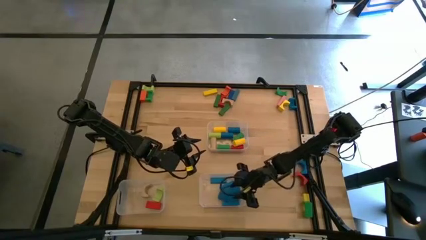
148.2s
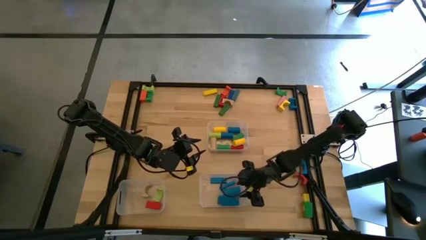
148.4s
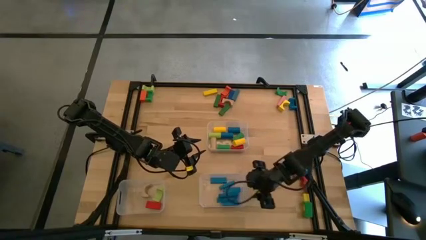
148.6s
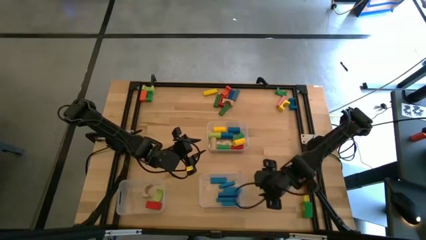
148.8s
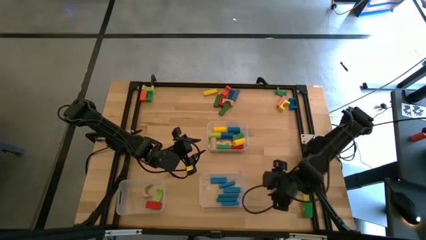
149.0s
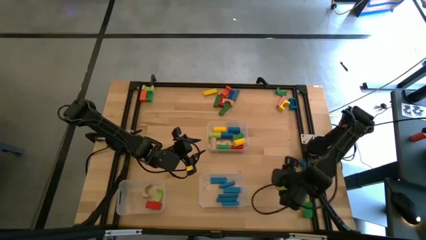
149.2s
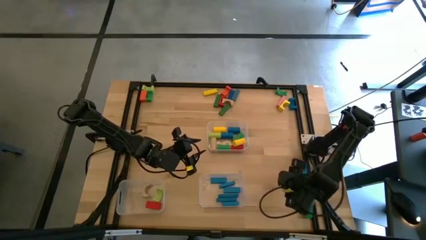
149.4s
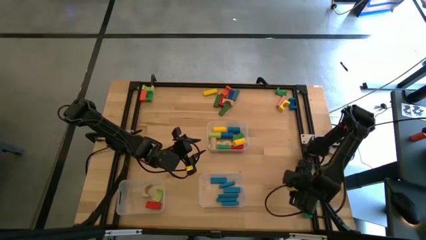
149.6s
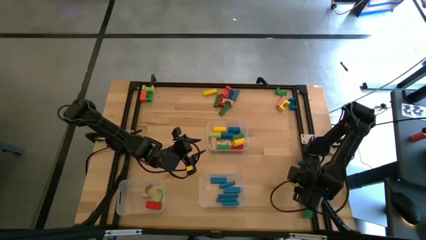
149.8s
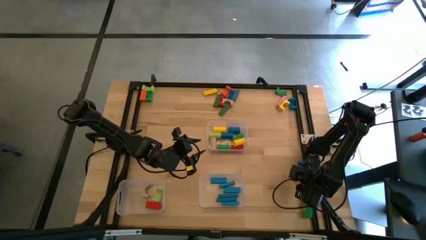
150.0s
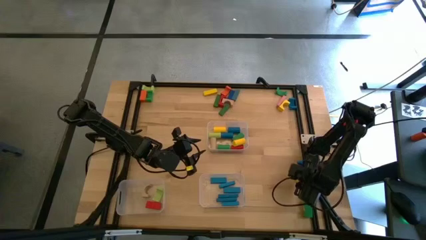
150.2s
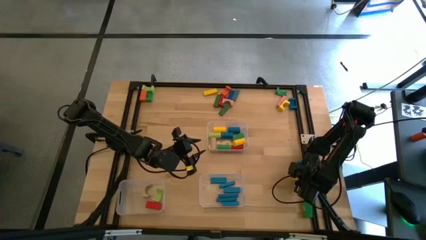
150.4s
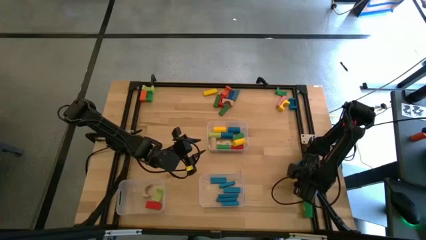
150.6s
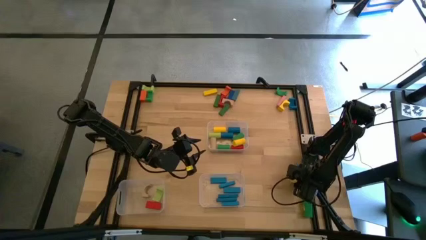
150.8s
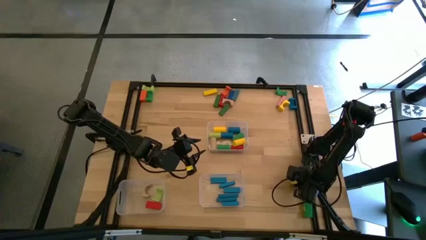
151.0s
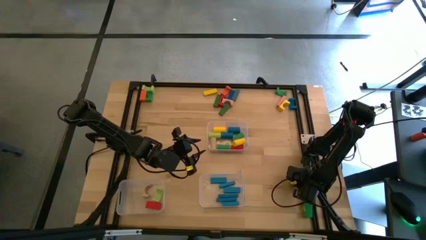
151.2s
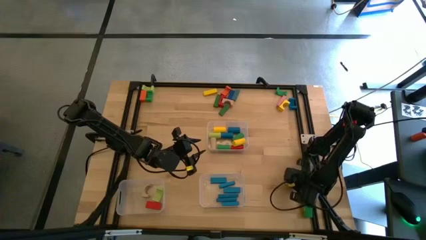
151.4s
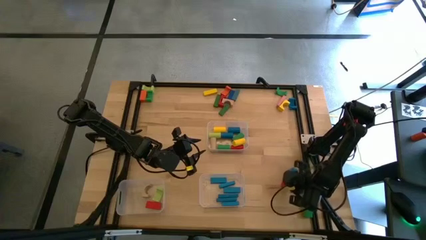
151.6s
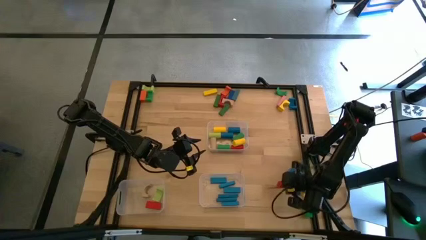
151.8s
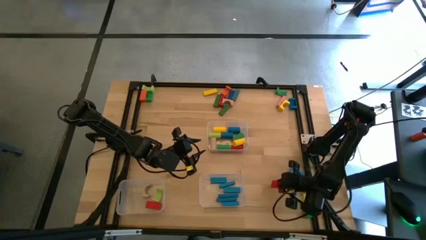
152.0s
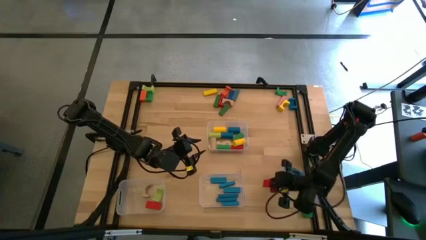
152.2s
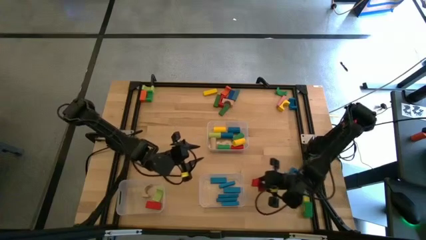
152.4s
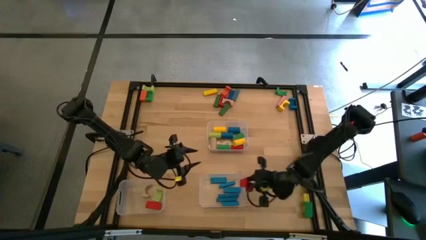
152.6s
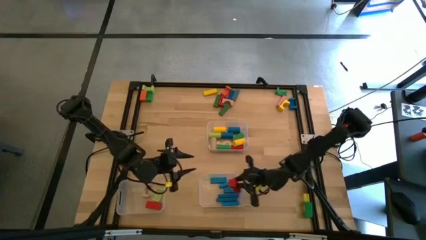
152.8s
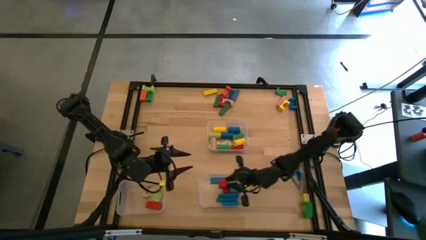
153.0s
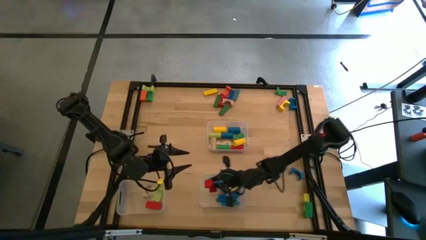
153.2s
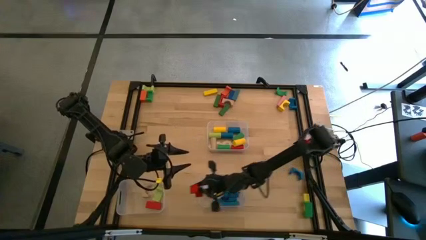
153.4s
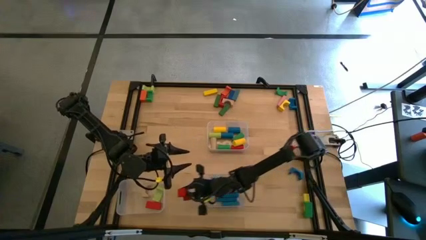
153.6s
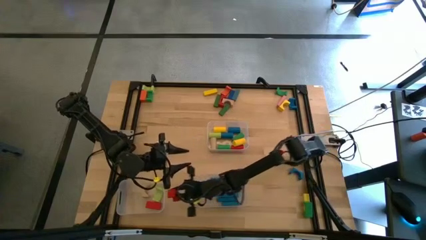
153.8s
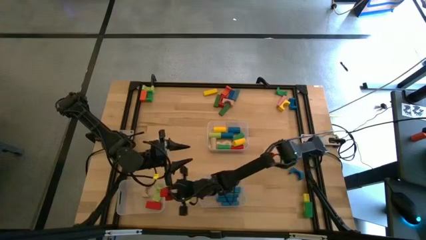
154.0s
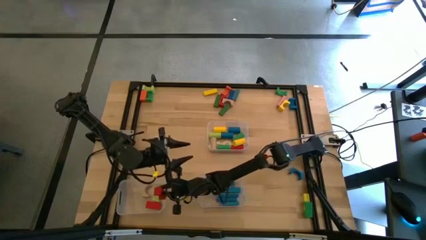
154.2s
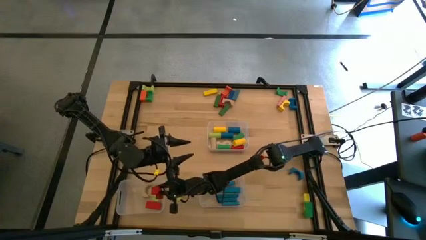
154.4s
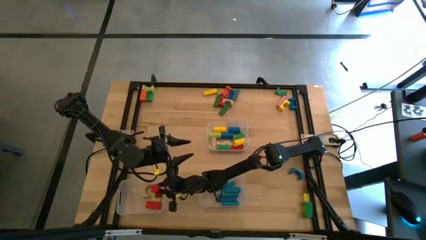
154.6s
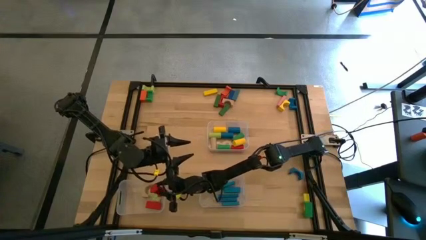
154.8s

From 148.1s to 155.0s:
Task: Sort blocks by size
Put the red arch block into the bottom left transparent bin

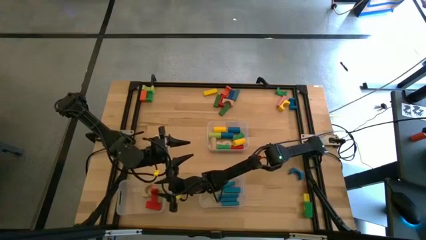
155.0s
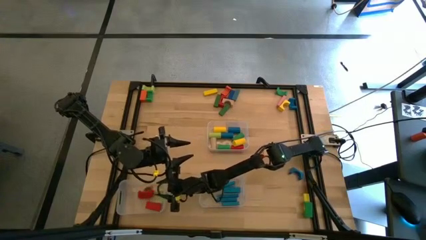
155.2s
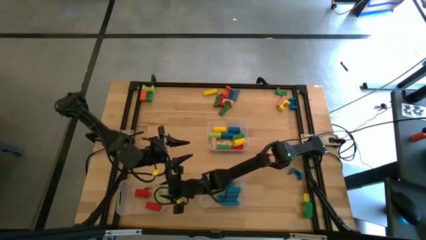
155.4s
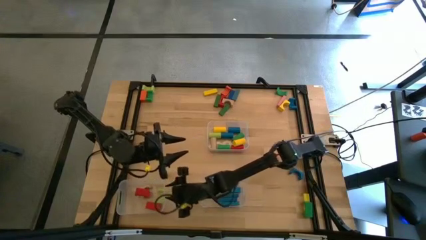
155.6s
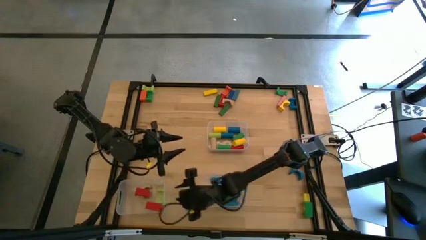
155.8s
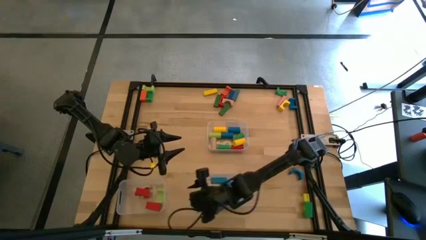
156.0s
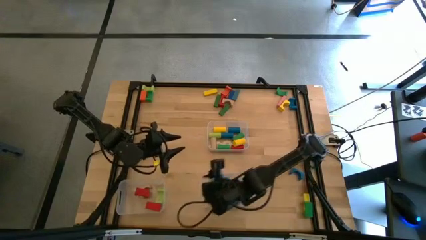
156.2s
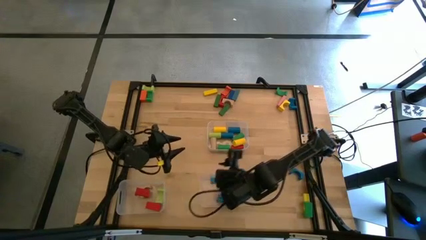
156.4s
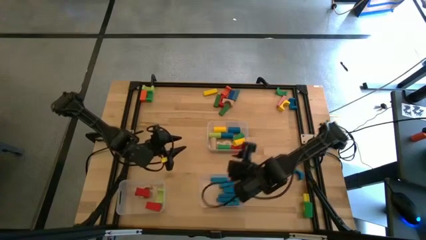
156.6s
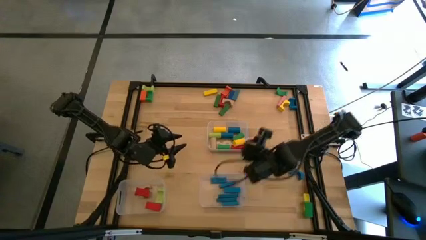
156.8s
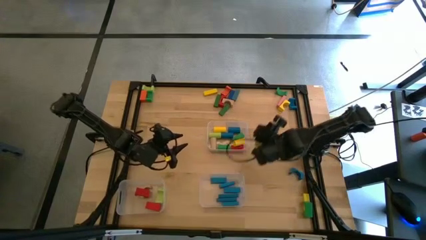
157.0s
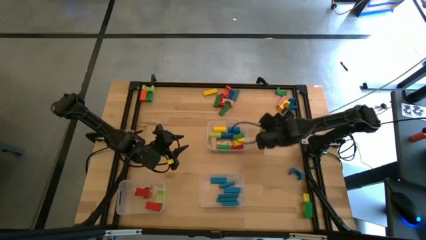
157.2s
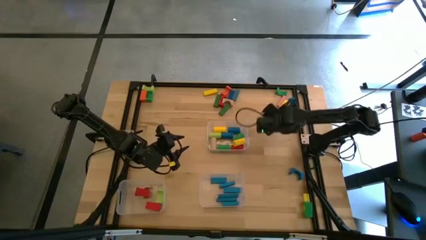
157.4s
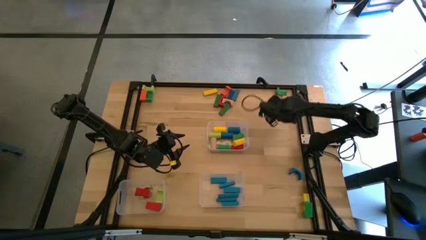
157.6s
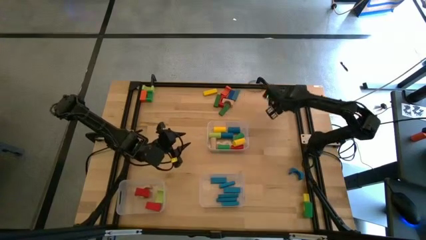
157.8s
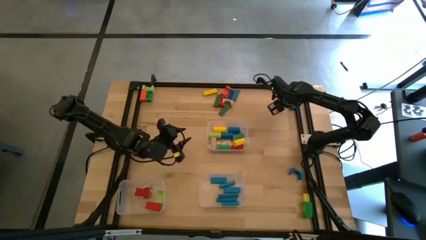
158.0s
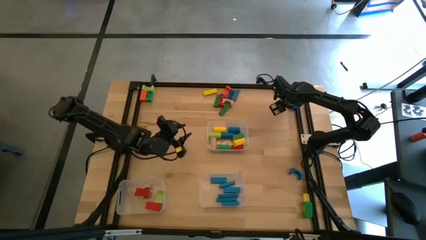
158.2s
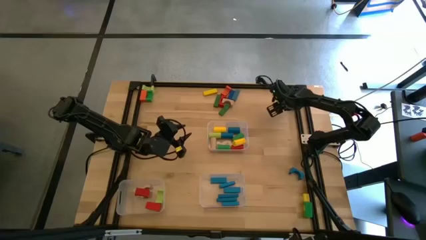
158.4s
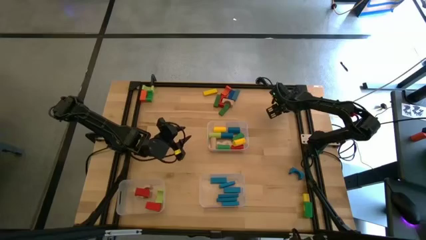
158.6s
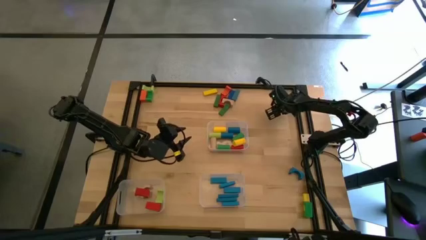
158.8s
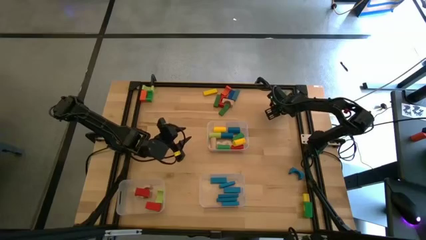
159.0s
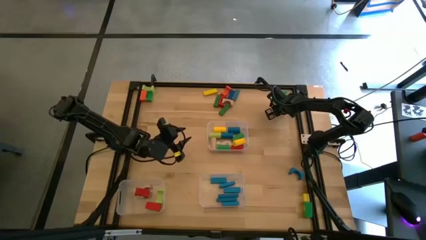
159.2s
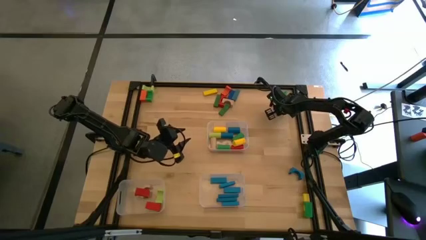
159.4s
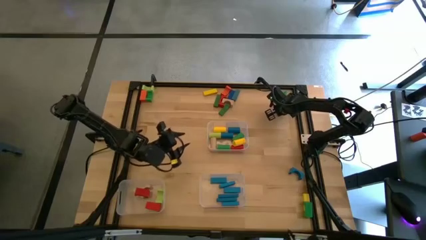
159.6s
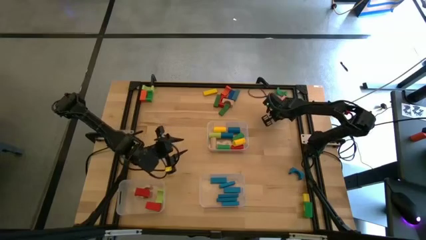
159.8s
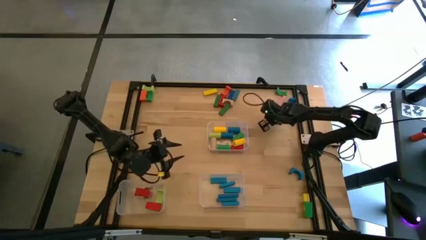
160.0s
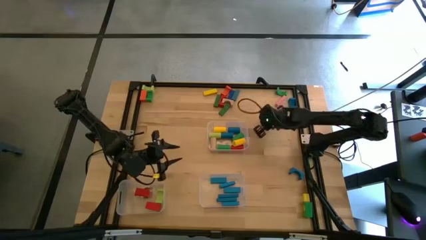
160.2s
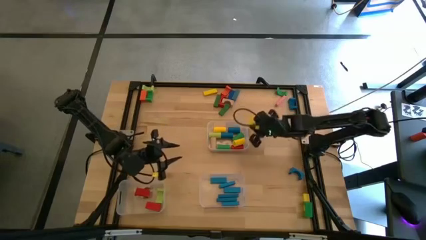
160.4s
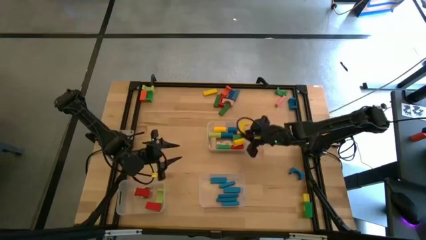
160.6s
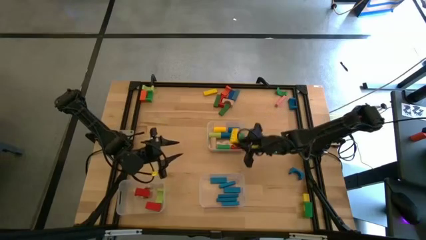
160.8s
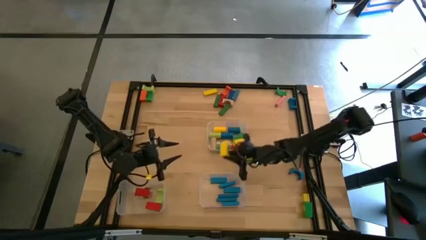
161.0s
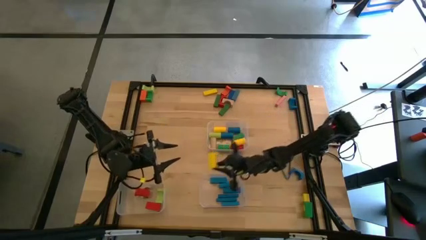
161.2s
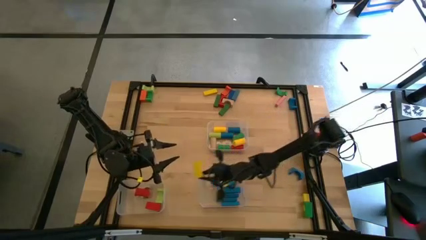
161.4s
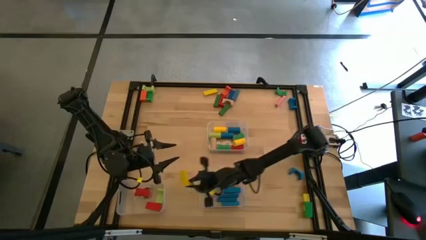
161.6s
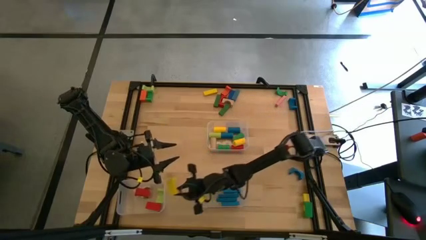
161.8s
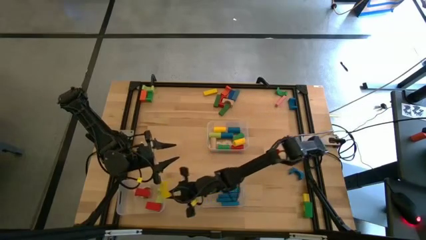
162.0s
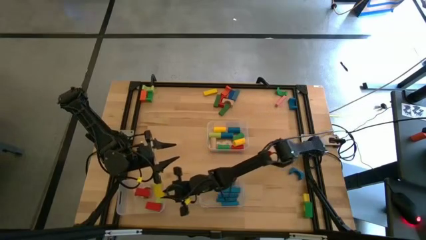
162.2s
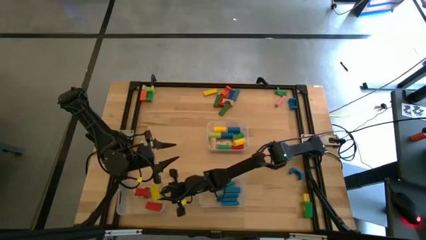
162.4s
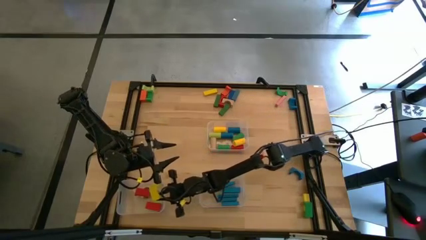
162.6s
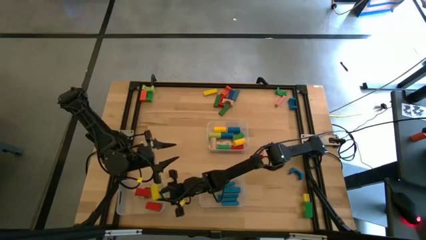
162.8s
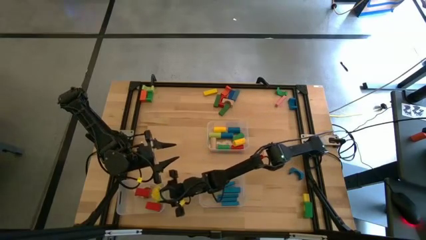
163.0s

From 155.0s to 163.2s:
Put the yellow arch block into the bottom left transparent bin

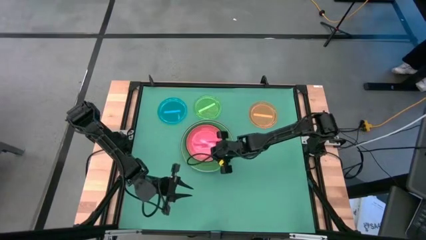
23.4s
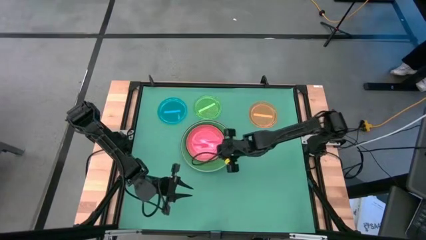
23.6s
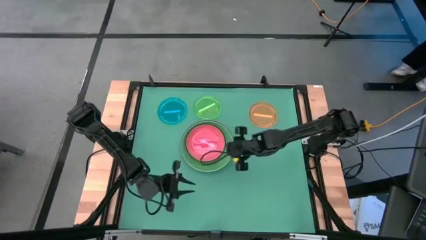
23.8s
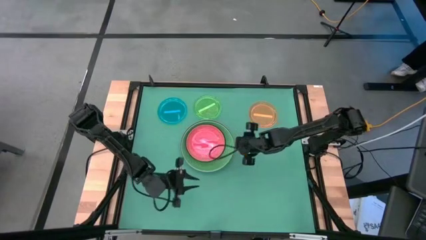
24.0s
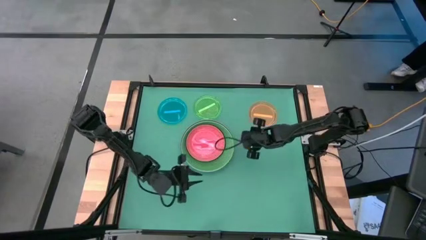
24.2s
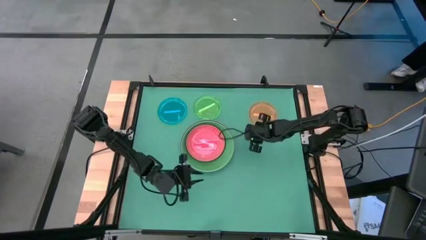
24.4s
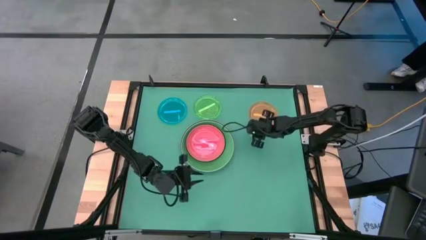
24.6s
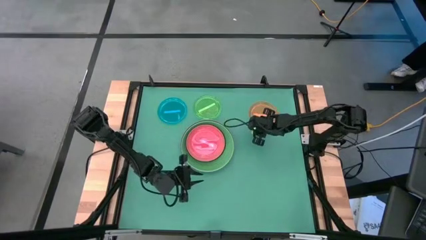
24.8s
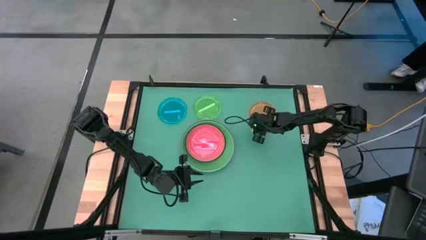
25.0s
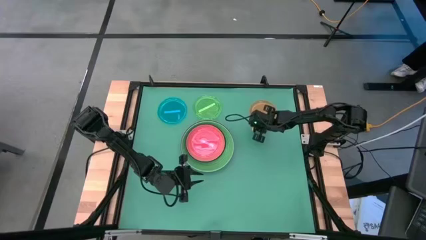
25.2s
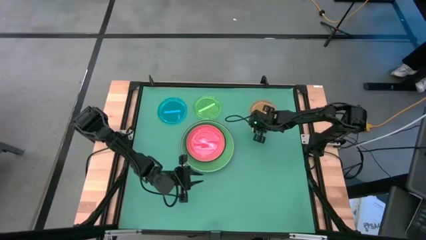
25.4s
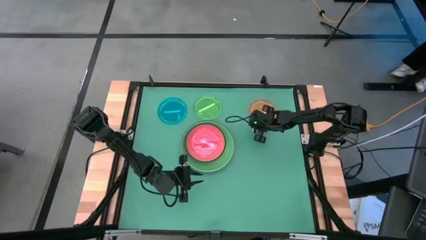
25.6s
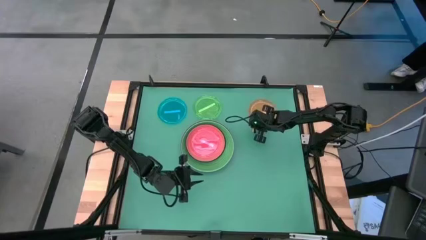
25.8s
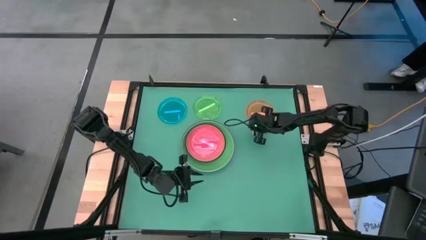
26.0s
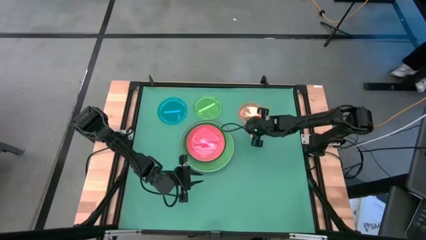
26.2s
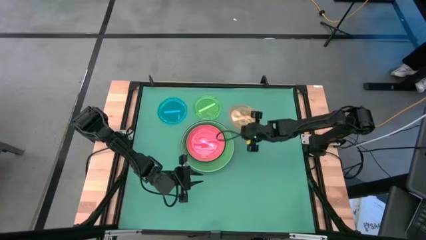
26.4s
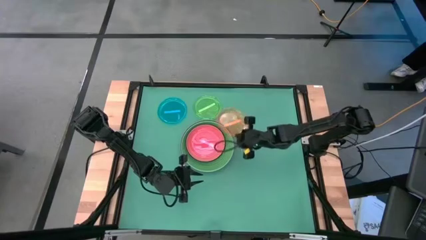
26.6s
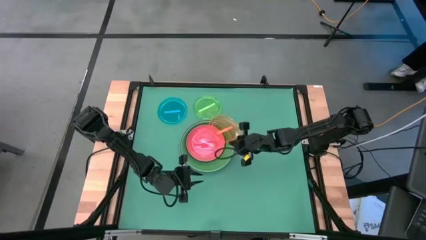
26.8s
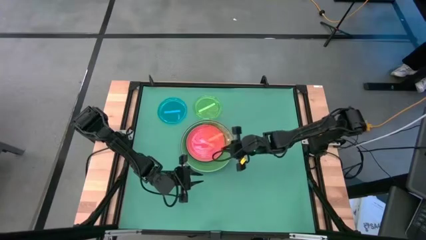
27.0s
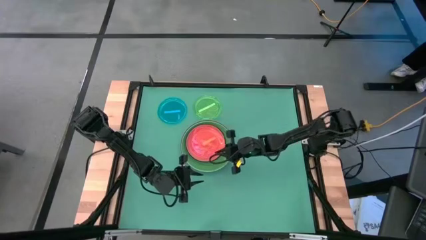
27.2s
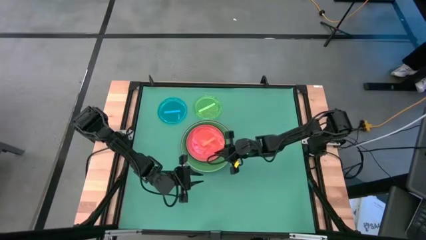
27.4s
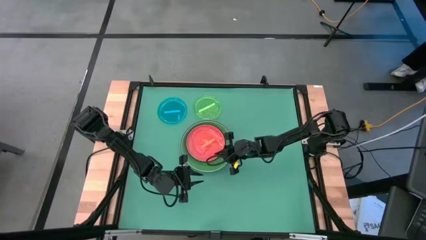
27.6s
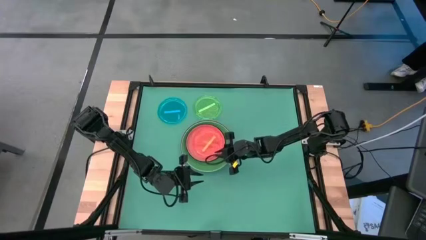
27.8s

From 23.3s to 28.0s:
Task: Stack plastic plates
Stack the transparent orange plate on top of the transparent pink plate
